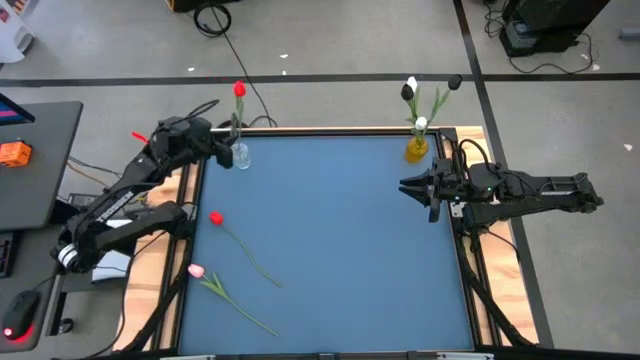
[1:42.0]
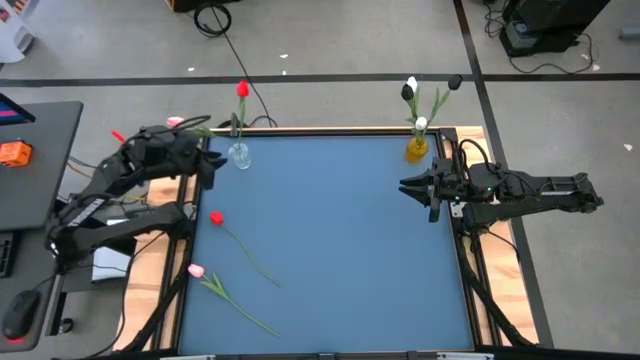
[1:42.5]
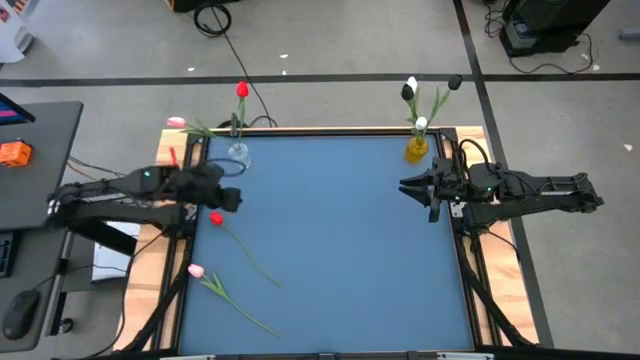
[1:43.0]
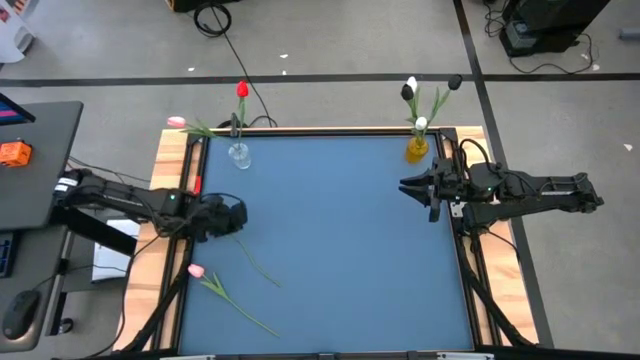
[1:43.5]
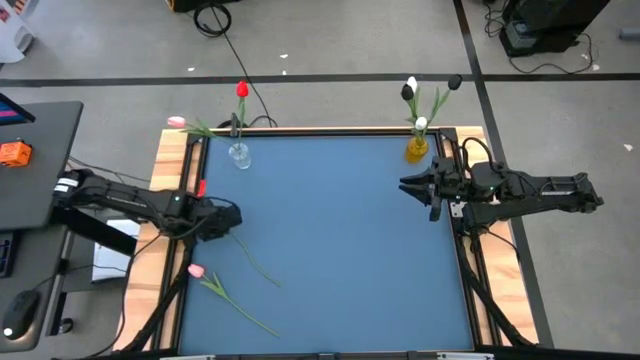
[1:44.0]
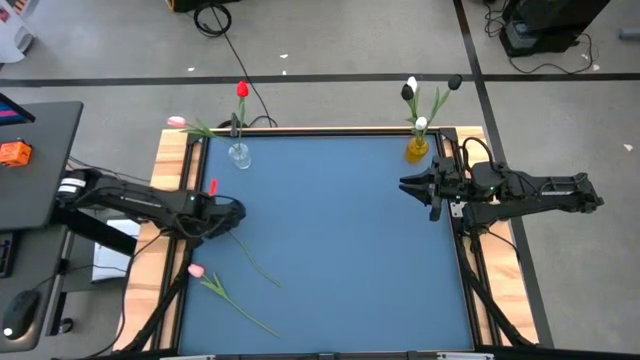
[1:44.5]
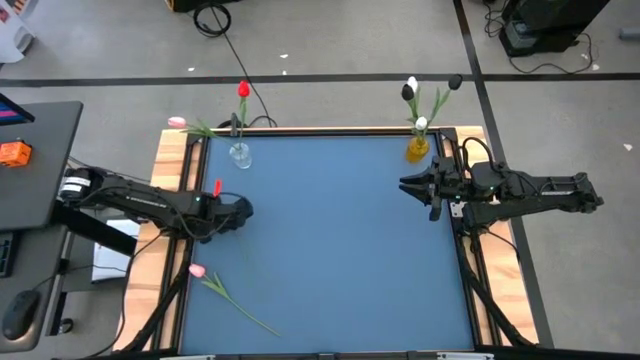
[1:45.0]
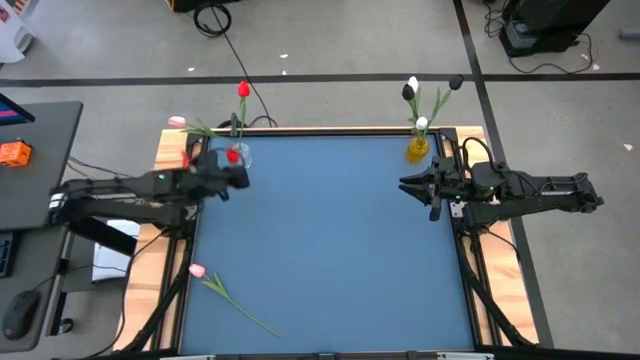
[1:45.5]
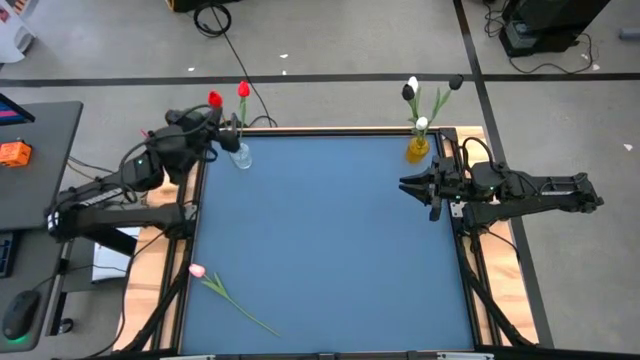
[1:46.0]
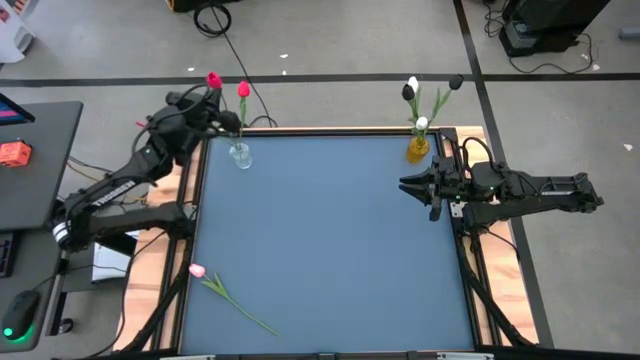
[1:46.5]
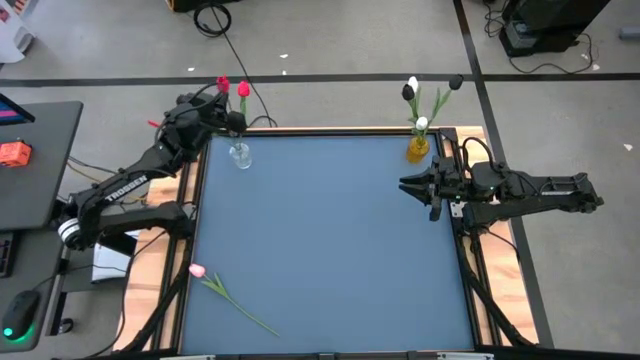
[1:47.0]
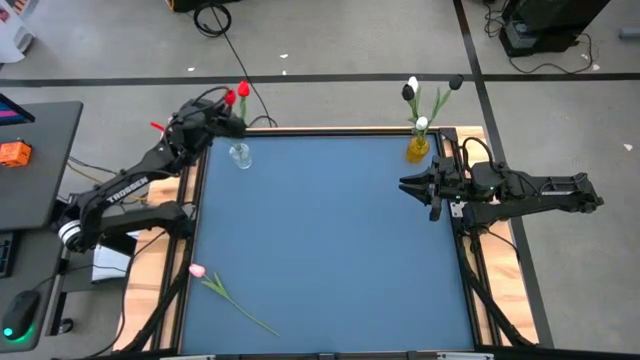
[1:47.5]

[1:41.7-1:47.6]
Task: Sort flowers into vase by color
Put the red tulip into the transparent vase

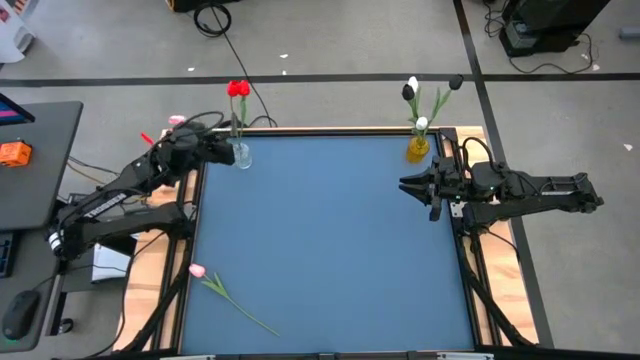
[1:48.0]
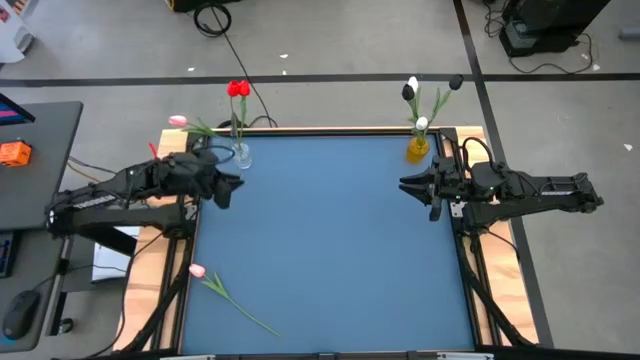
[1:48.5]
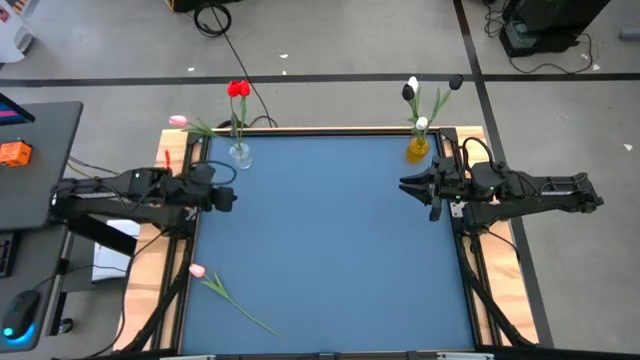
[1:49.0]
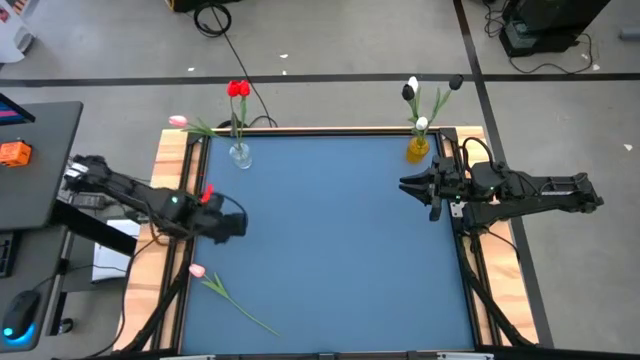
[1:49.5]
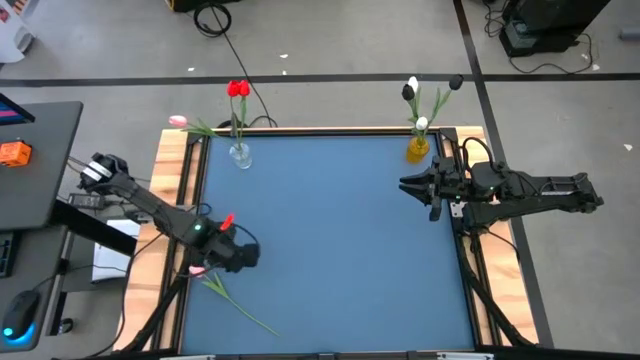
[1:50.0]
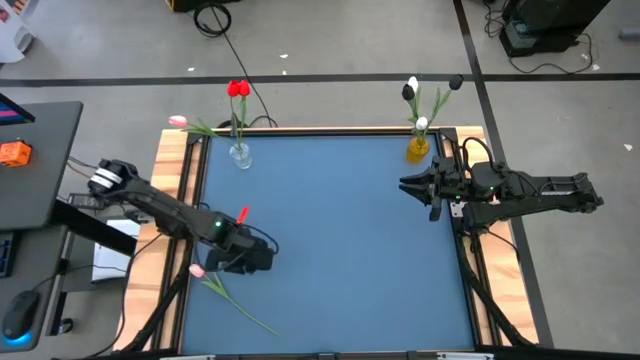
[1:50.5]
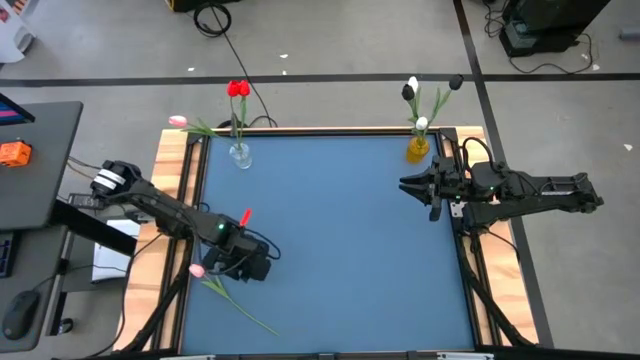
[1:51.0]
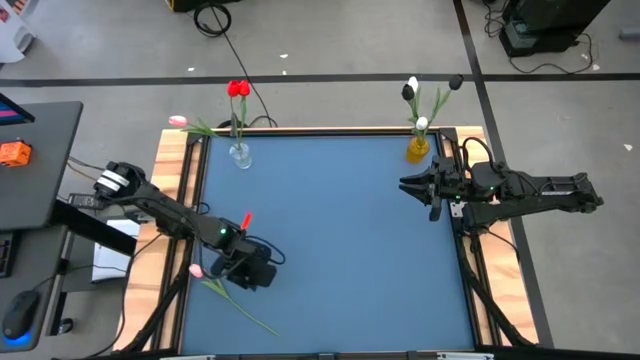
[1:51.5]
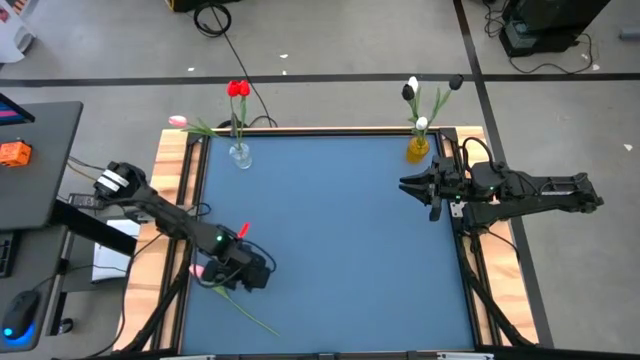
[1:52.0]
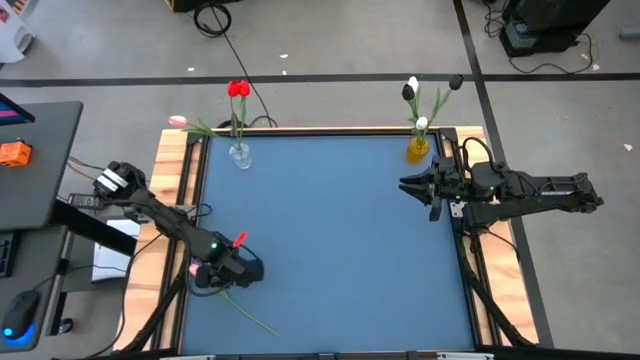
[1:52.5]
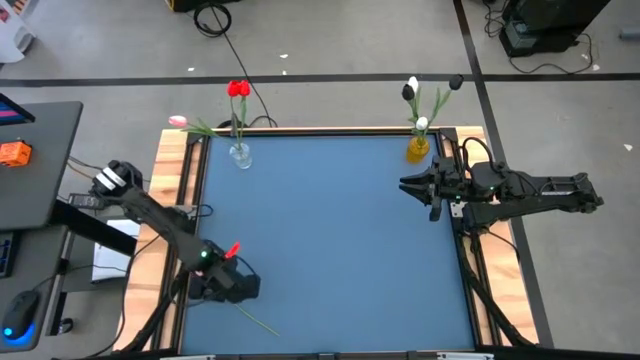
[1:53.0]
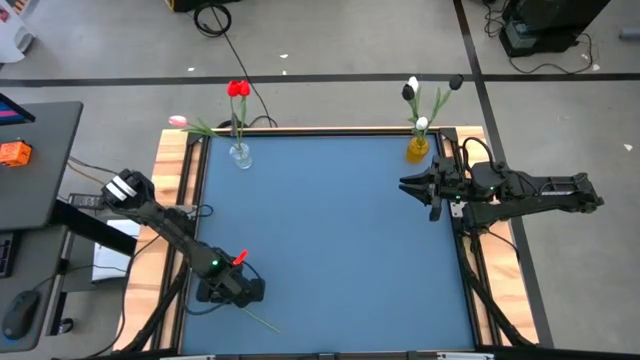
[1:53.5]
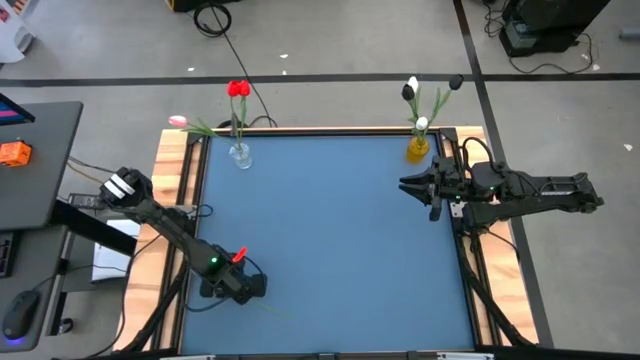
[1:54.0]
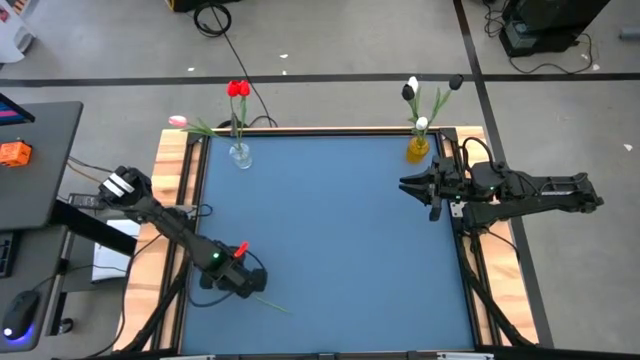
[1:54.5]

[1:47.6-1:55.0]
Put the pink tulip into the transparent vase

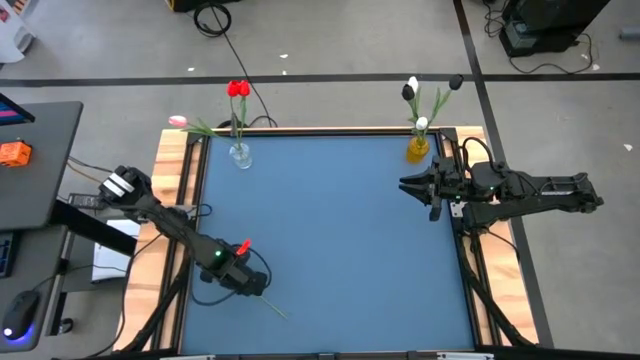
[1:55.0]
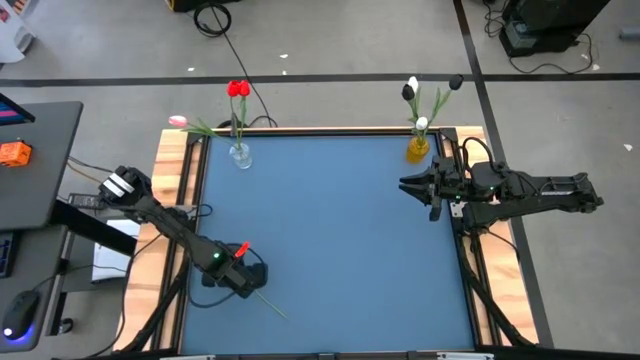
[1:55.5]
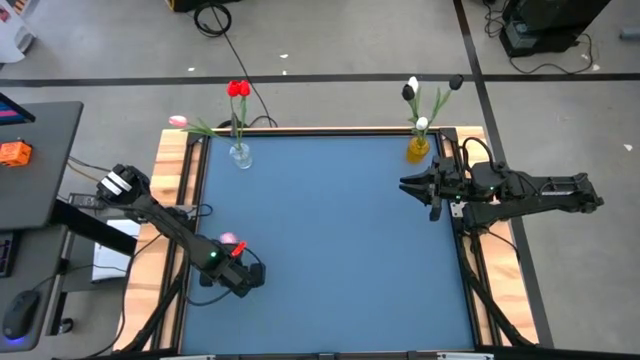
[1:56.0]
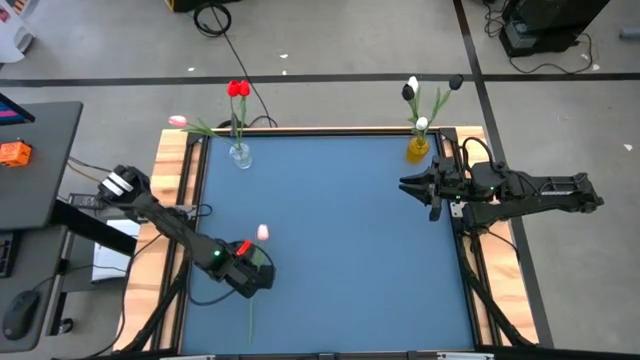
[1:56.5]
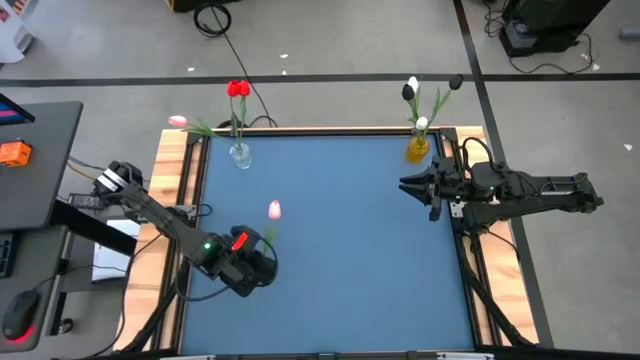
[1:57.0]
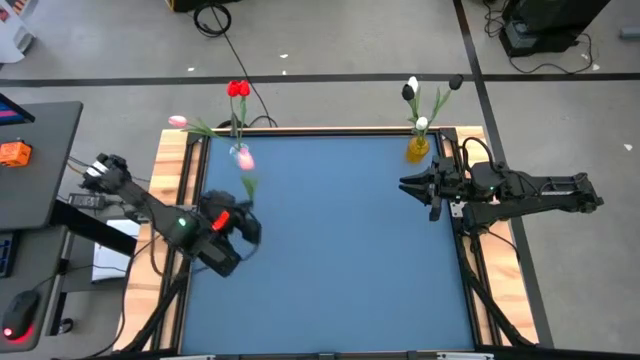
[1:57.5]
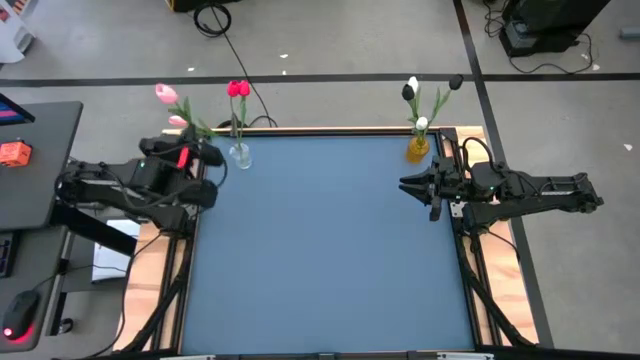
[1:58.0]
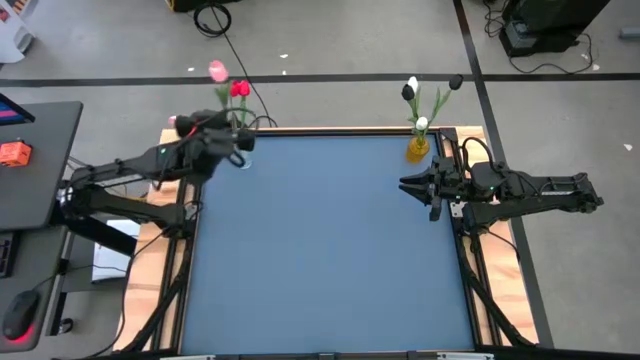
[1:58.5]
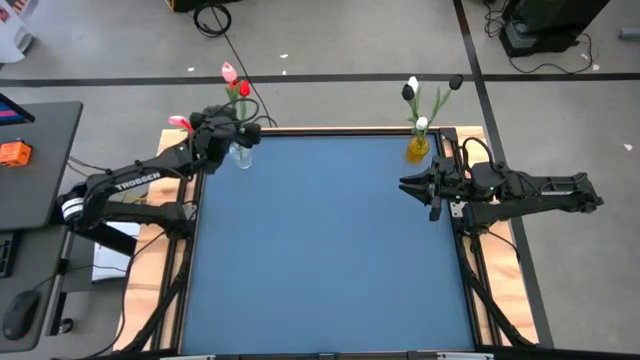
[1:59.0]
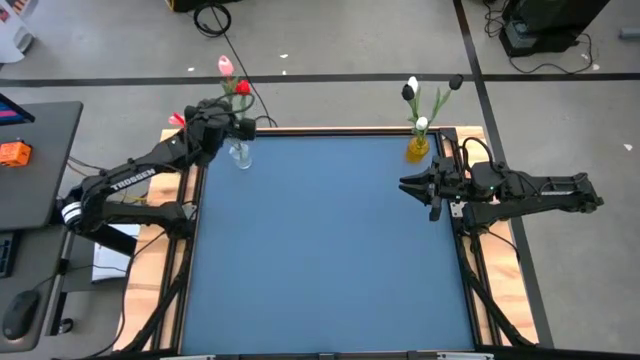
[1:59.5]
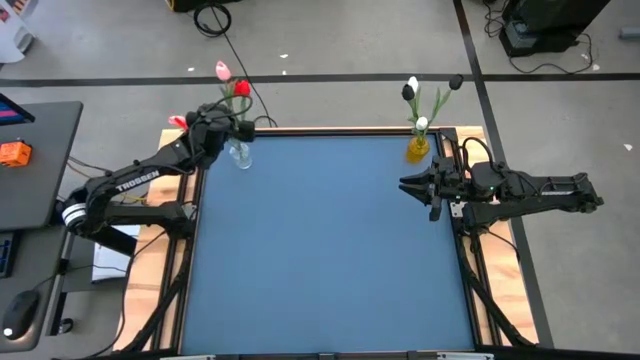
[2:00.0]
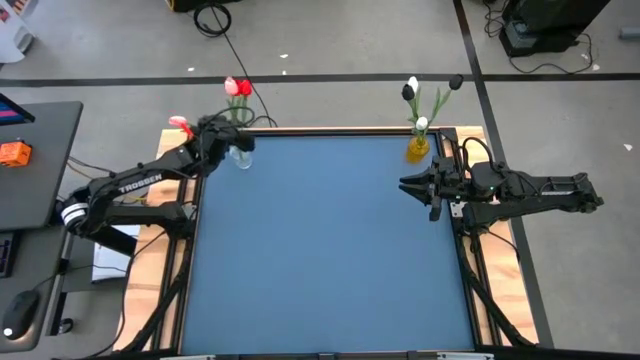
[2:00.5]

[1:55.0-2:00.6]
Put the pink tulip into the transparent vase

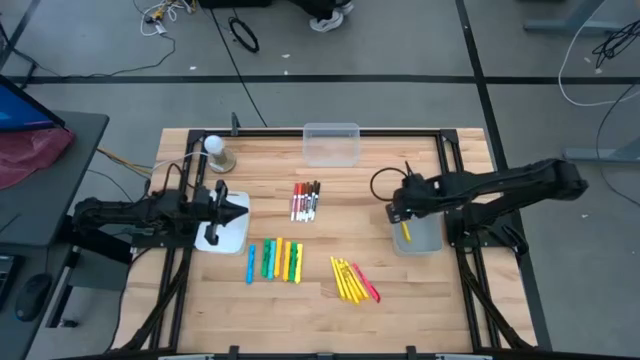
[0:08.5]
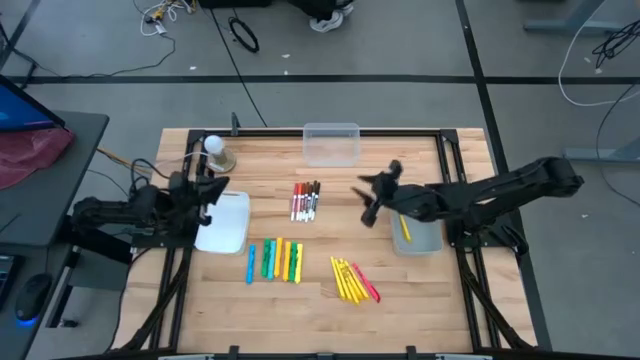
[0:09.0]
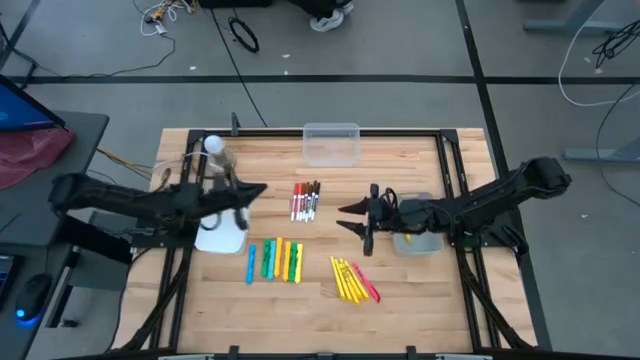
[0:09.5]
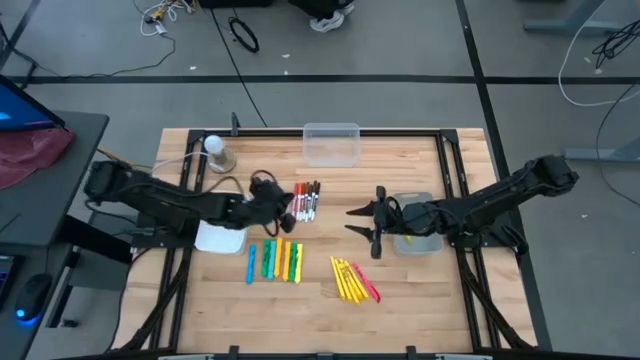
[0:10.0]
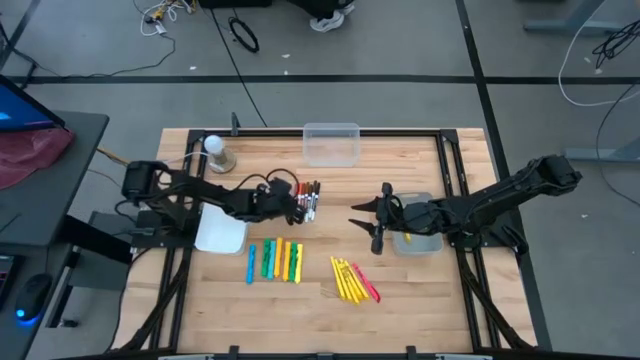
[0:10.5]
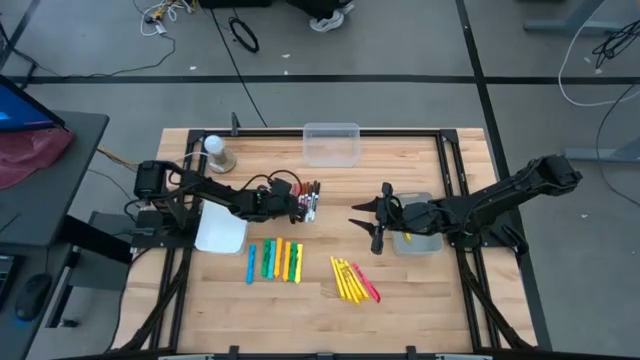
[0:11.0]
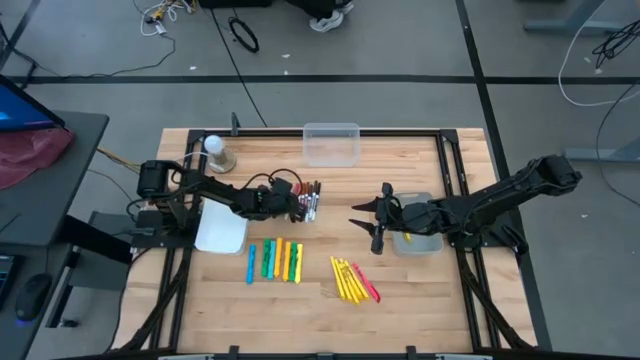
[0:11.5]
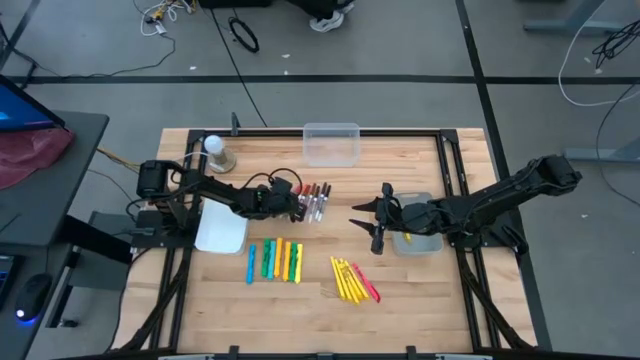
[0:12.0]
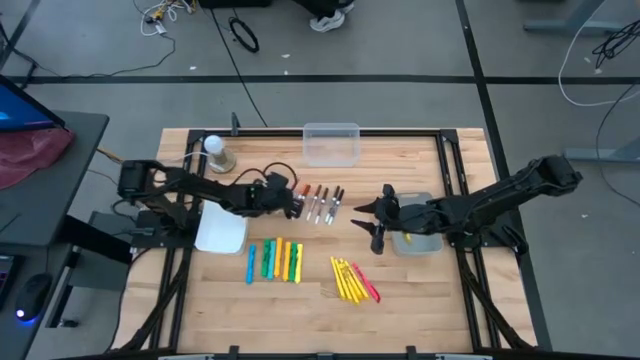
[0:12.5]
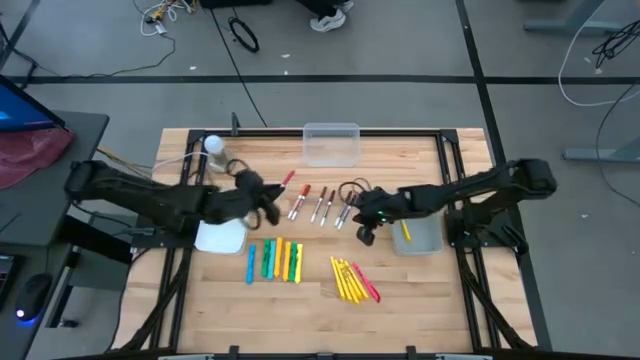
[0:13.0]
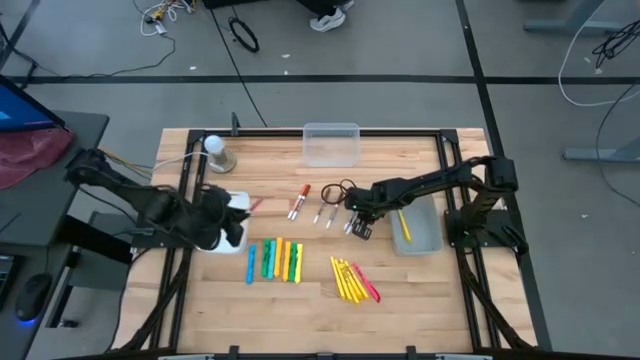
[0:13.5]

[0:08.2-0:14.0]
Task: Pick & Place Markers
Put the pink marker pen into the white bin
